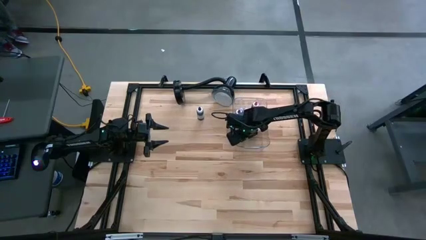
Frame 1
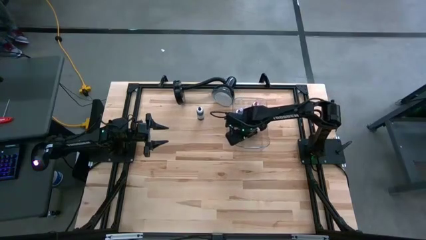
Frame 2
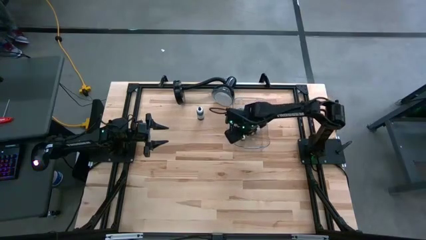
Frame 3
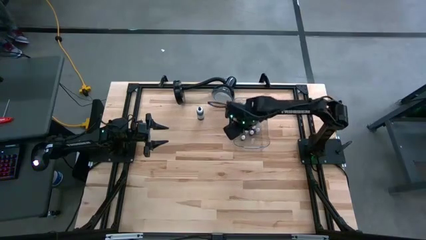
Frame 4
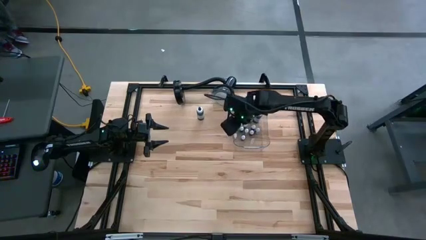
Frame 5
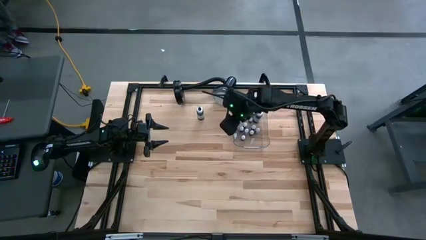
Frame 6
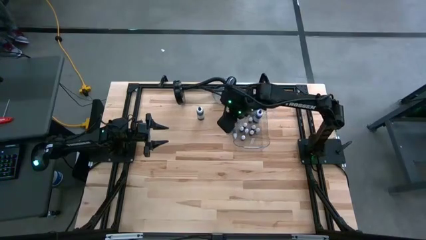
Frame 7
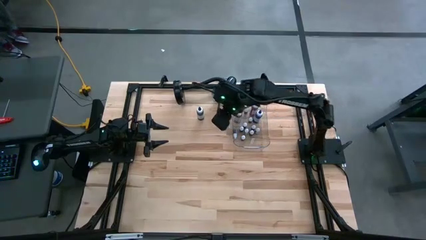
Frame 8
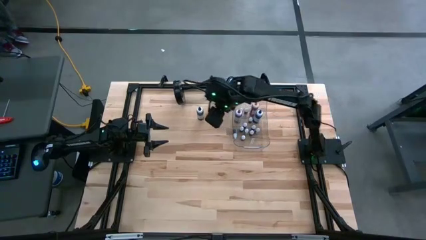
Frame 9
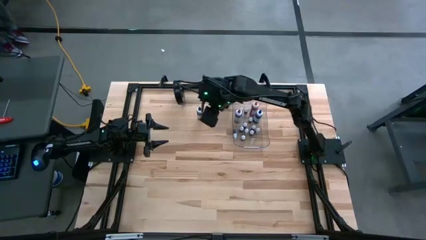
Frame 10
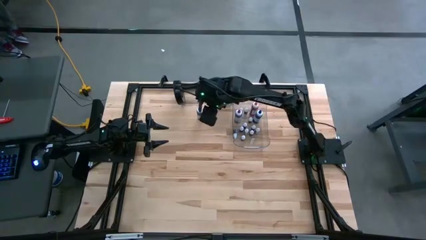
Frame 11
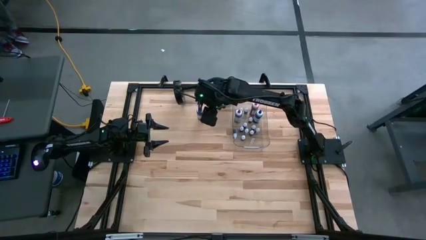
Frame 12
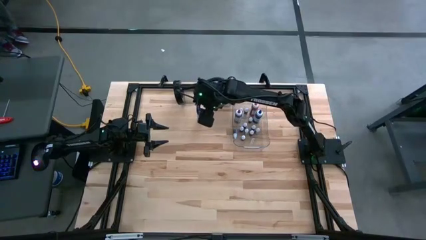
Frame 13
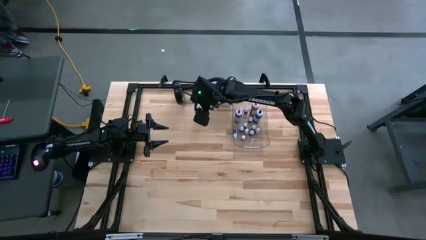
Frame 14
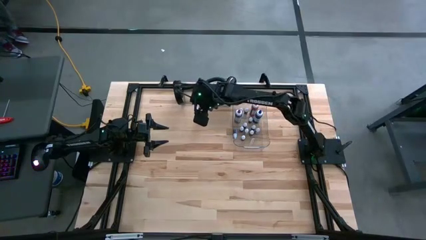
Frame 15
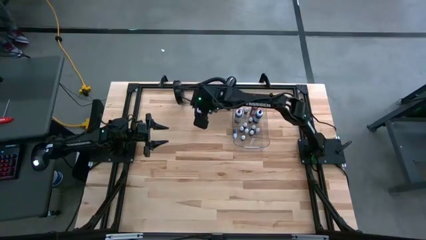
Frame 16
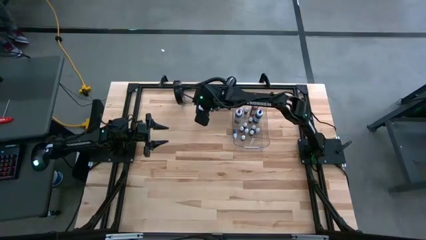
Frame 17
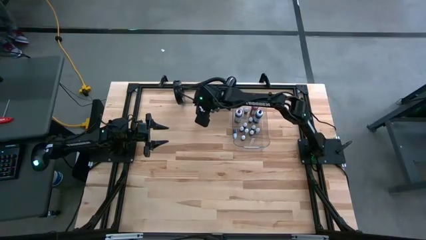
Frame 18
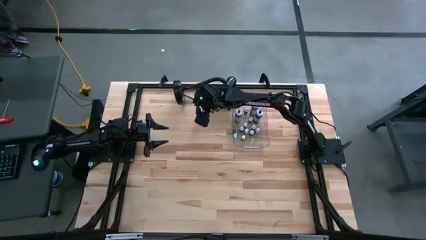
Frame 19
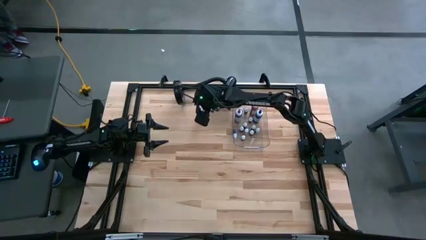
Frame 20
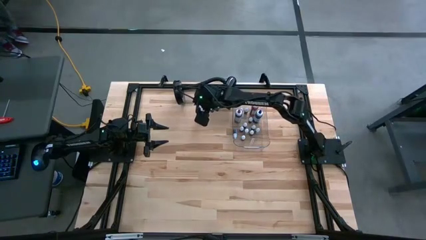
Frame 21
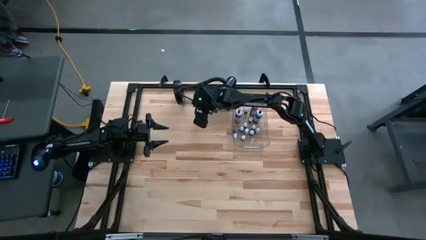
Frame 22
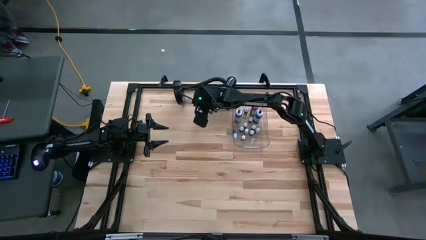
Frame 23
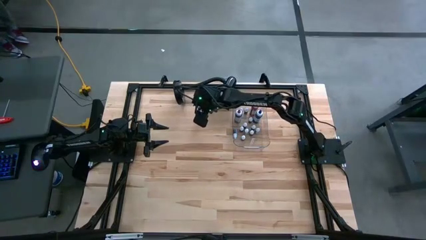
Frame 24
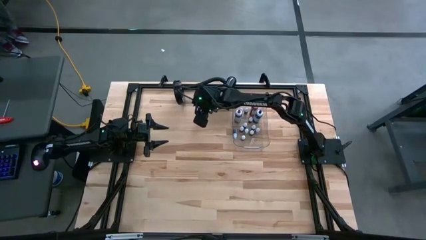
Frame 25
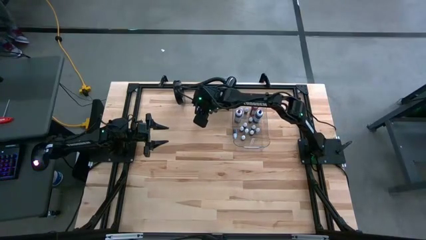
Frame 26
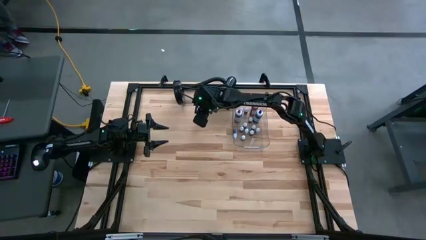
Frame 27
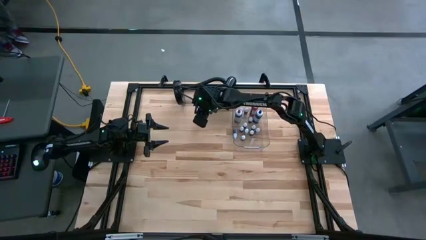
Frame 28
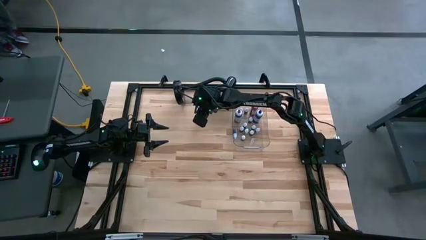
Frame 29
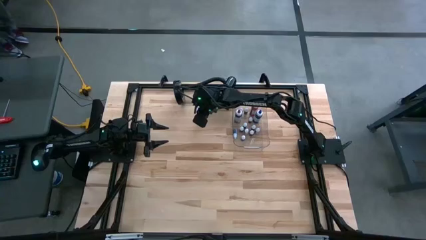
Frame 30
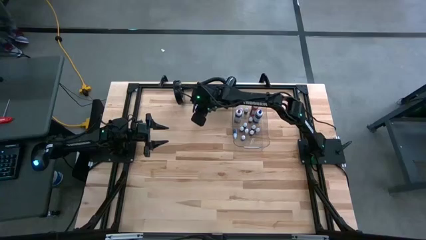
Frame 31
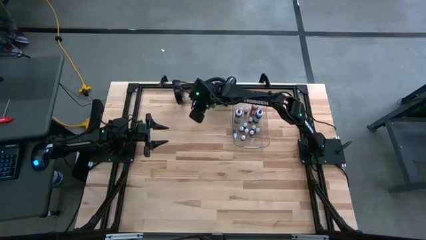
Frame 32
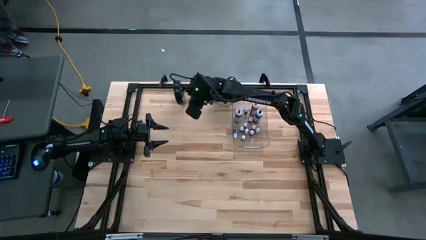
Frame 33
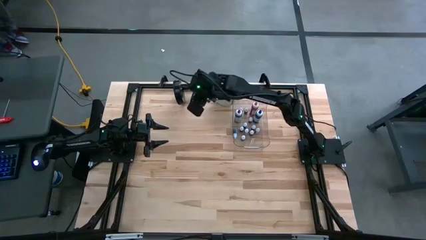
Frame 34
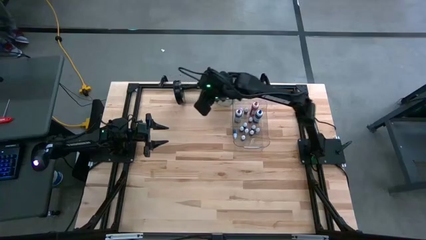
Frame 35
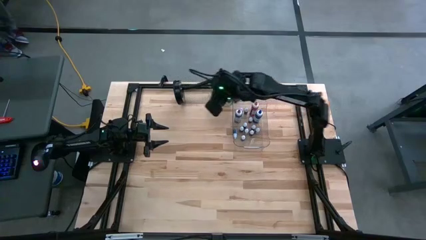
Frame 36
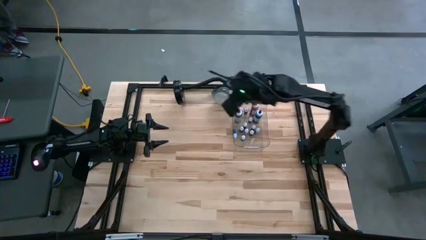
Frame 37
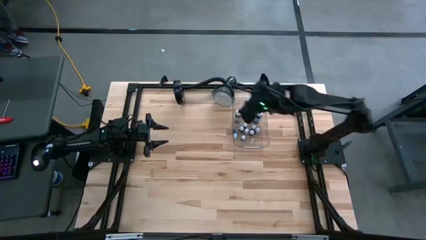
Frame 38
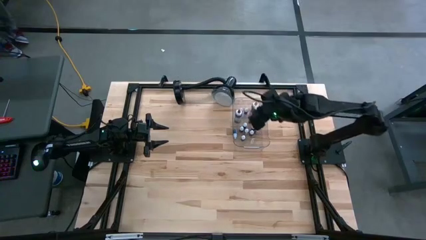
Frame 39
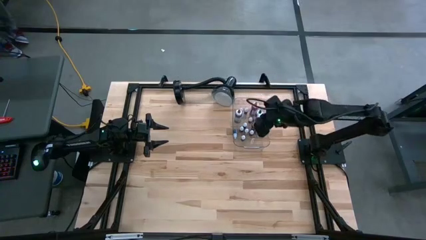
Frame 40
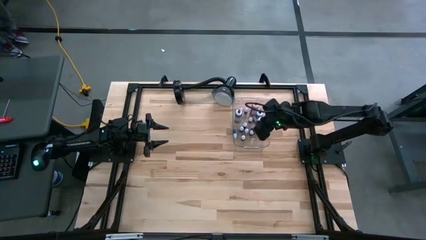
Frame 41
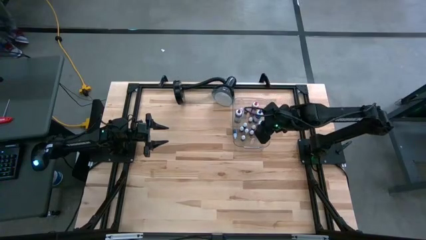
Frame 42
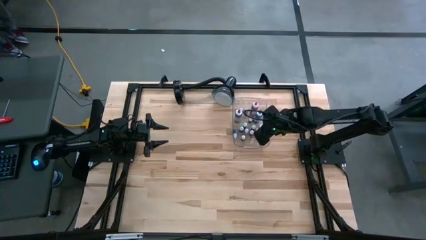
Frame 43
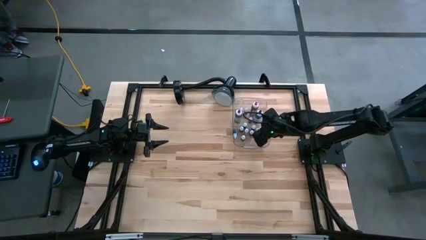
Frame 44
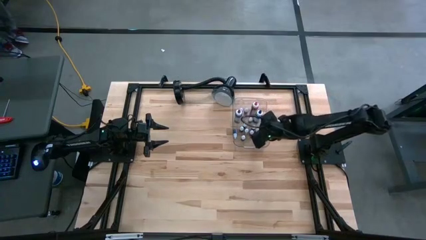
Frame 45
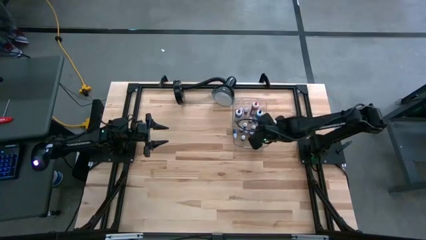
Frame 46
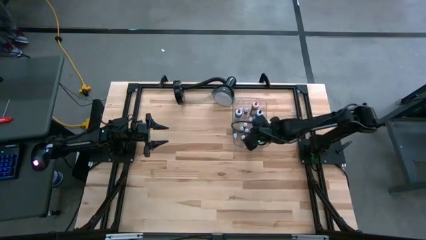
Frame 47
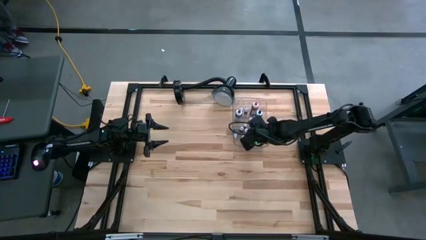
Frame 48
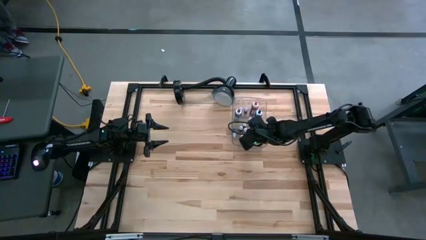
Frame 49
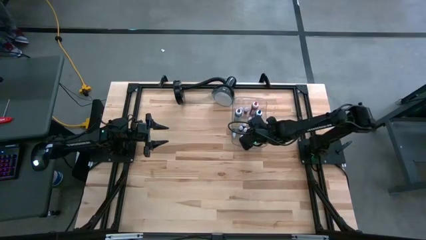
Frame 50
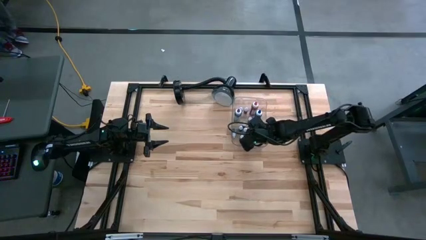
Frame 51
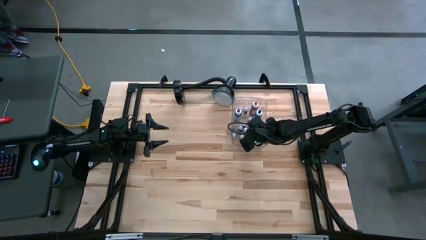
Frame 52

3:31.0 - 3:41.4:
Task: Pick & Place food coloring
Put the big black food coloring bottle into the transparent bin

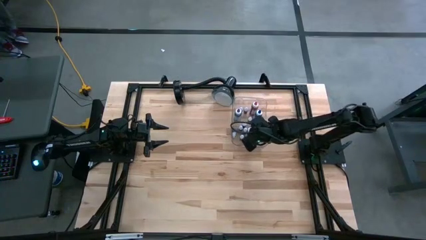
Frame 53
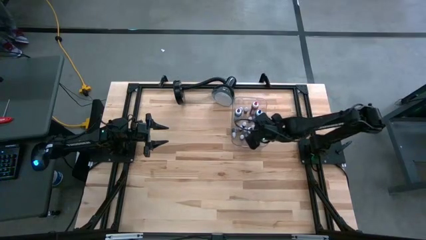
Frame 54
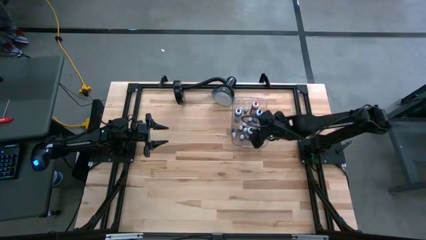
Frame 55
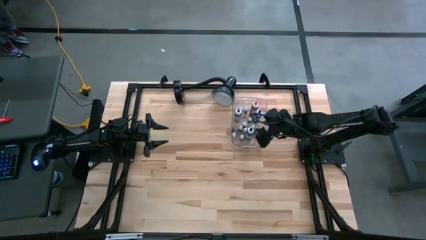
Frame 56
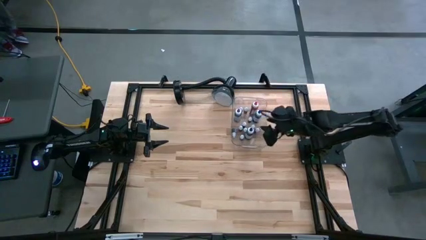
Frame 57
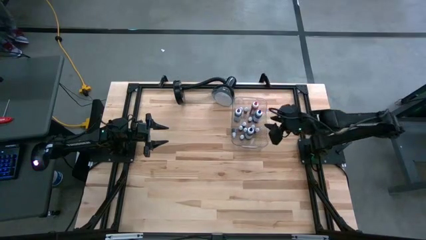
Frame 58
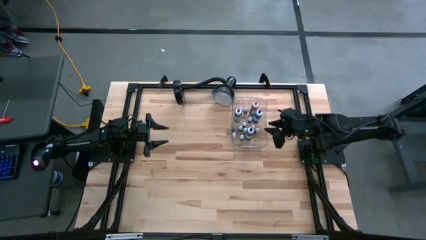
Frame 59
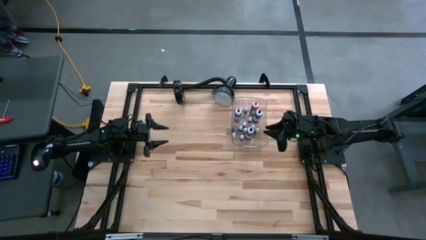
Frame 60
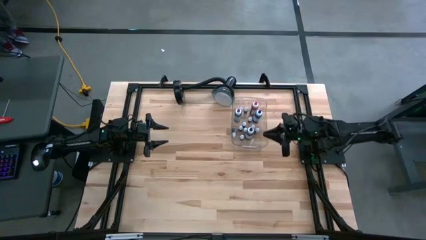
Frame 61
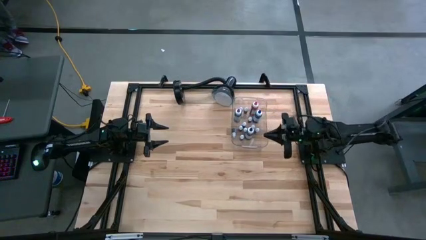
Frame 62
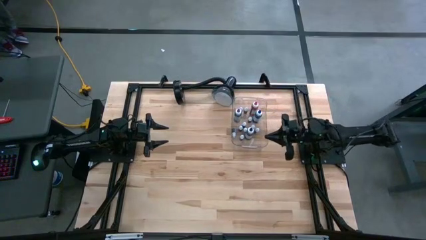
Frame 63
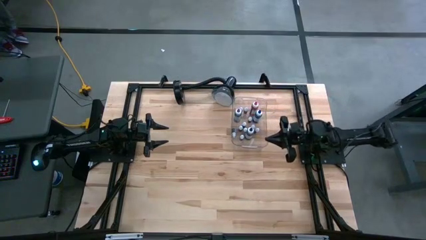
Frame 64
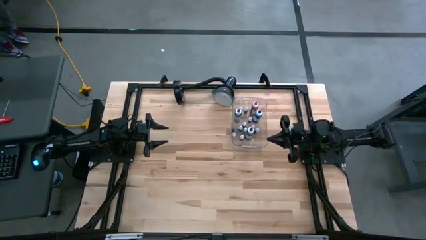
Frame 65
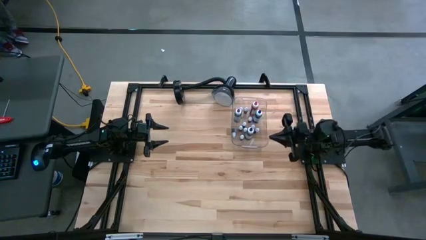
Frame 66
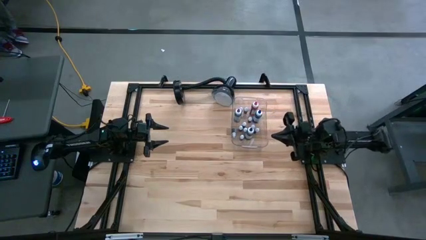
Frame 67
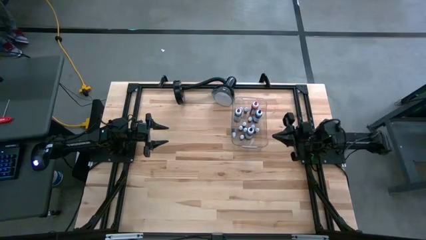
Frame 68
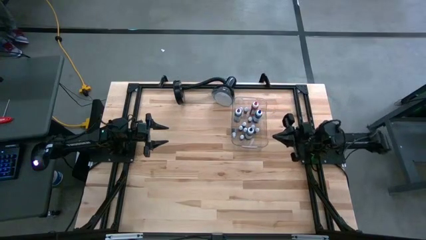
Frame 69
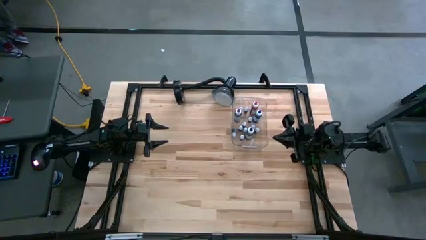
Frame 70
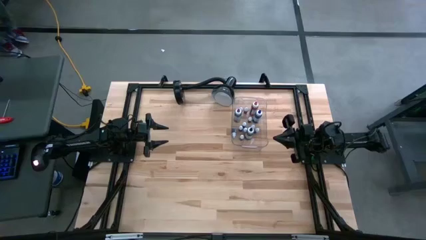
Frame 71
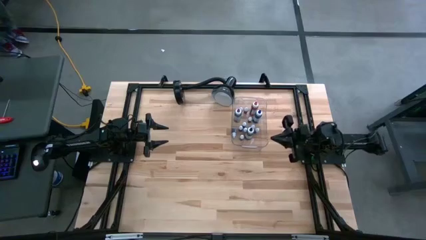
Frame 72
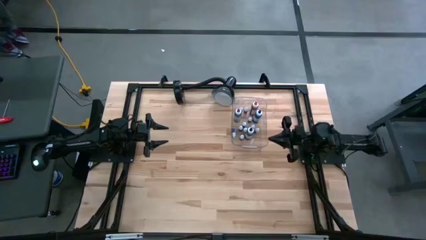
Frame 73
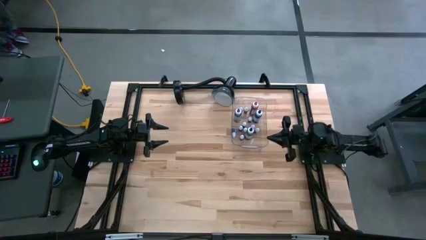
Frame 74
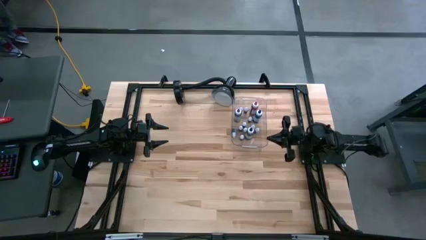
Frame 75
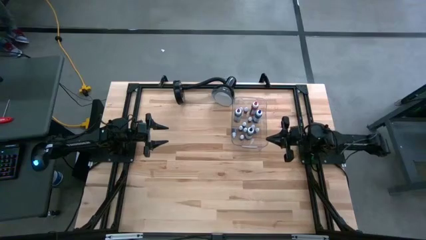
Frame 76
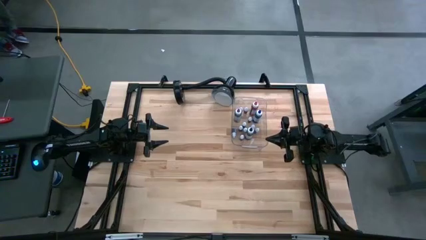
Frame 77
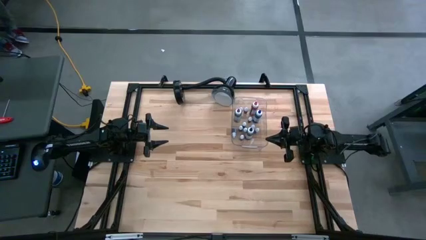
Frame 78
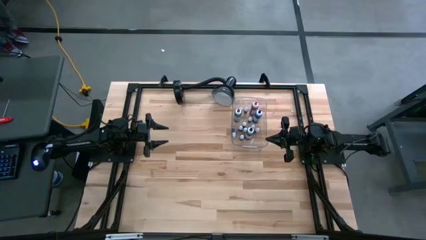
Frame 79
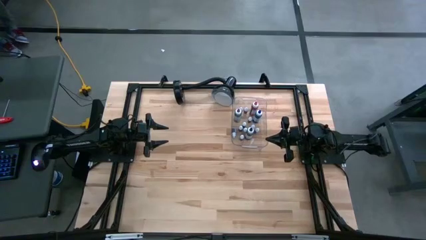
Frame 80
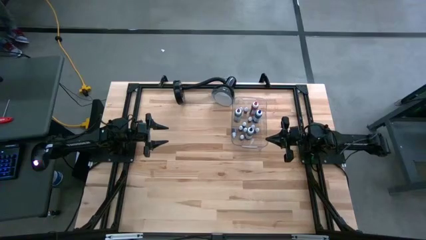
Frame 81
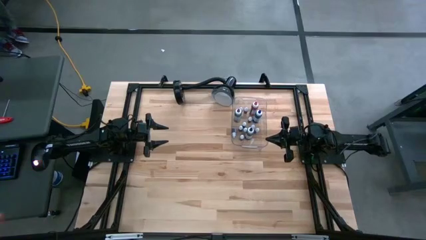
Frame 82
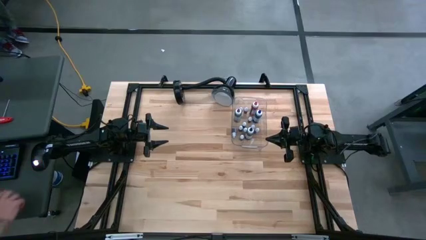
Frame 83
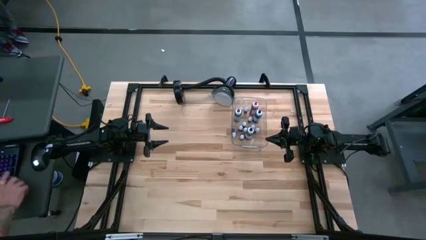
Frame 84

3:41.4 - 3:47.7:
Return to Home Position
